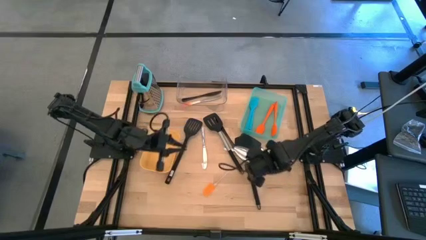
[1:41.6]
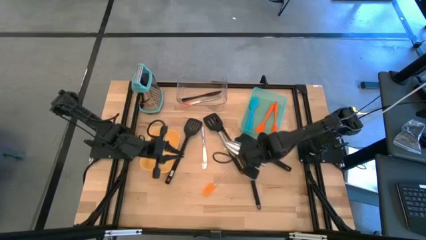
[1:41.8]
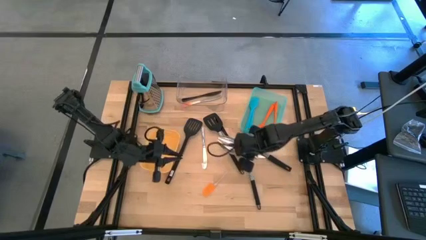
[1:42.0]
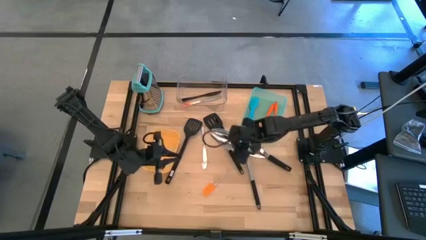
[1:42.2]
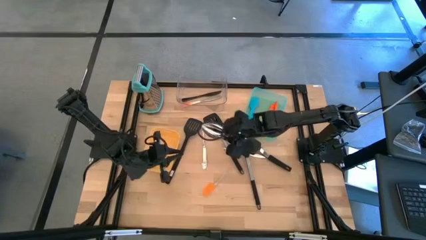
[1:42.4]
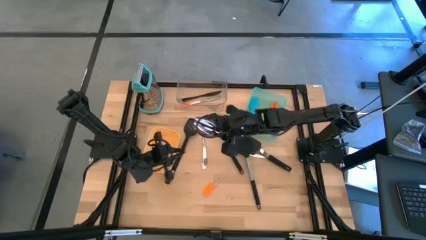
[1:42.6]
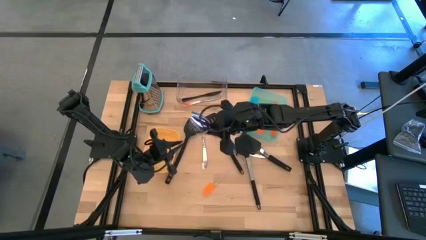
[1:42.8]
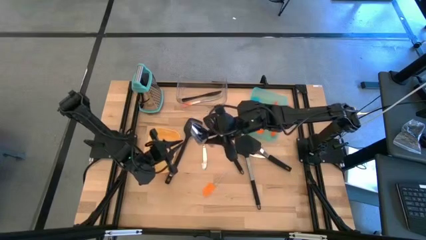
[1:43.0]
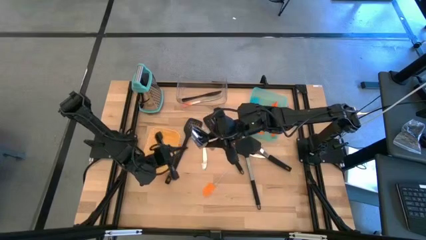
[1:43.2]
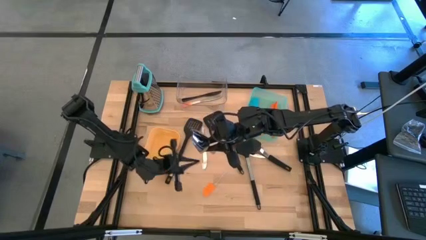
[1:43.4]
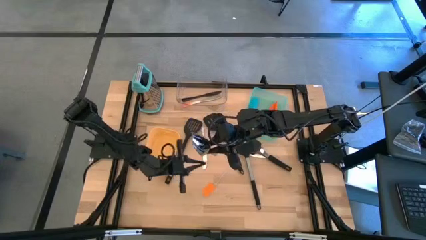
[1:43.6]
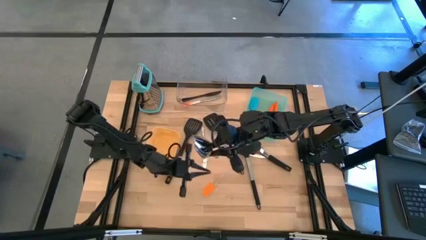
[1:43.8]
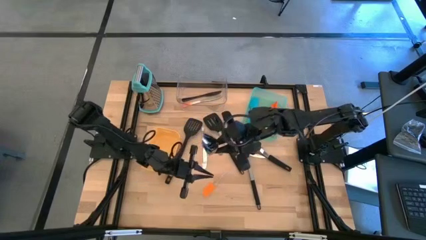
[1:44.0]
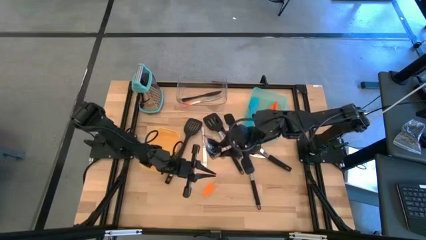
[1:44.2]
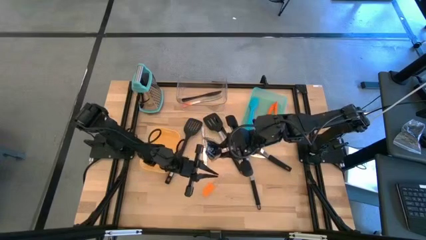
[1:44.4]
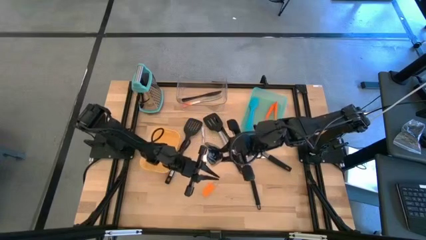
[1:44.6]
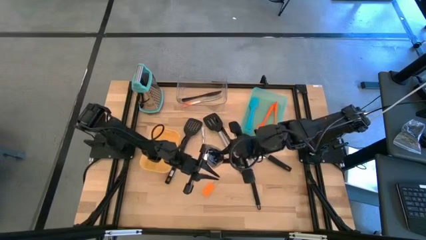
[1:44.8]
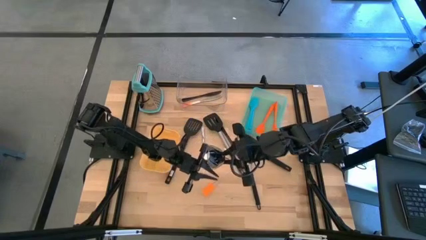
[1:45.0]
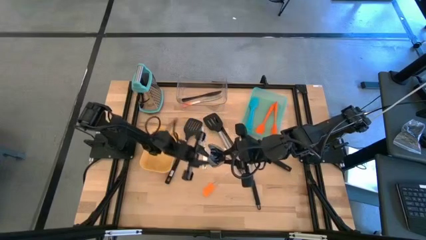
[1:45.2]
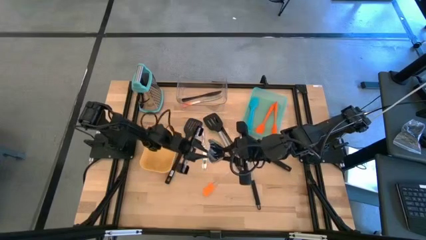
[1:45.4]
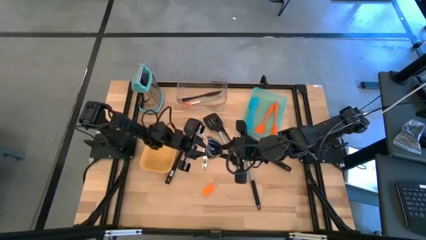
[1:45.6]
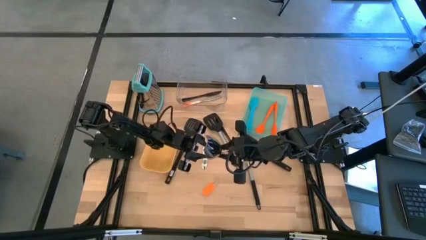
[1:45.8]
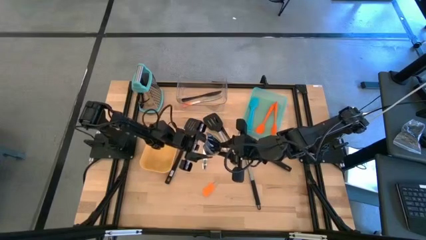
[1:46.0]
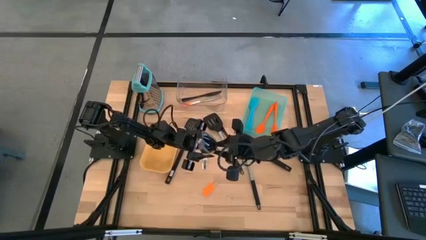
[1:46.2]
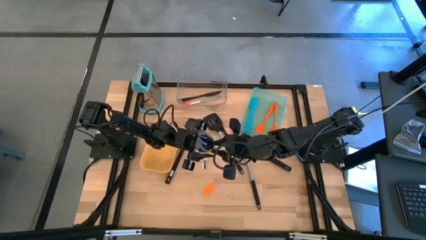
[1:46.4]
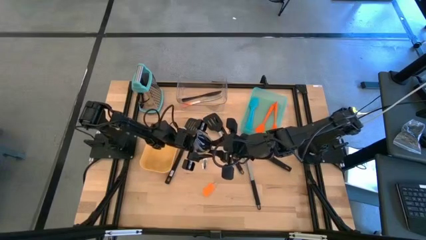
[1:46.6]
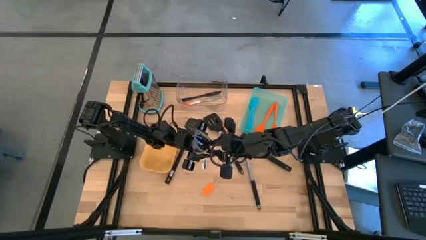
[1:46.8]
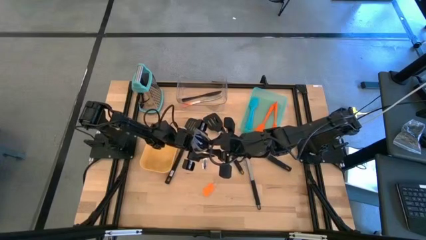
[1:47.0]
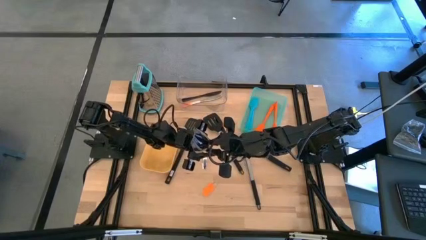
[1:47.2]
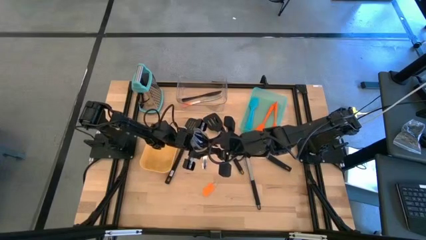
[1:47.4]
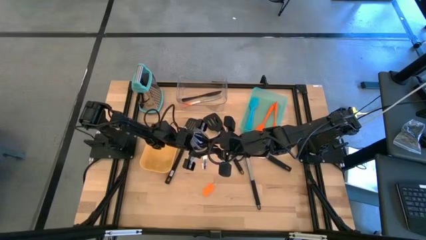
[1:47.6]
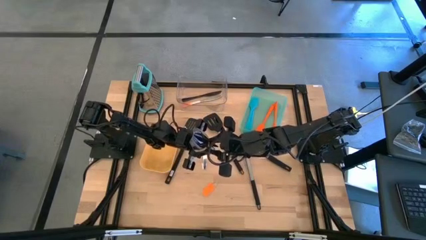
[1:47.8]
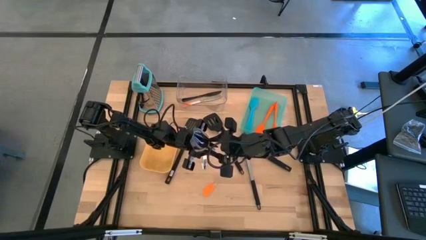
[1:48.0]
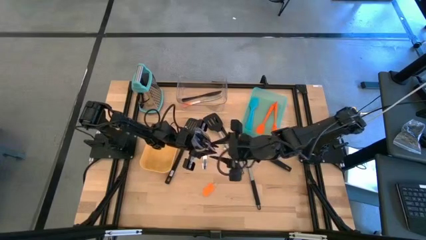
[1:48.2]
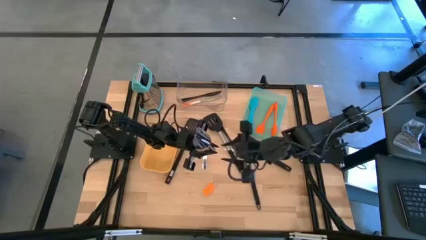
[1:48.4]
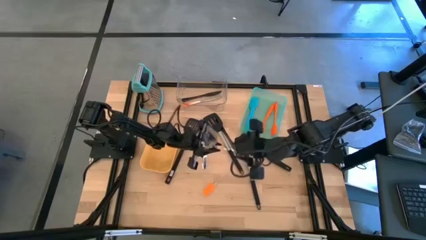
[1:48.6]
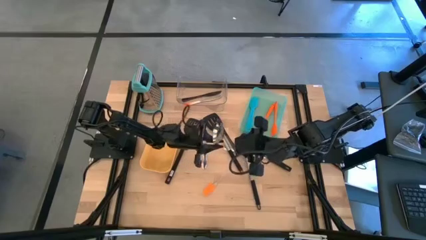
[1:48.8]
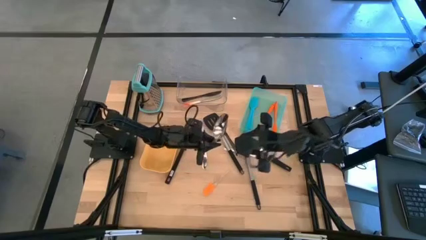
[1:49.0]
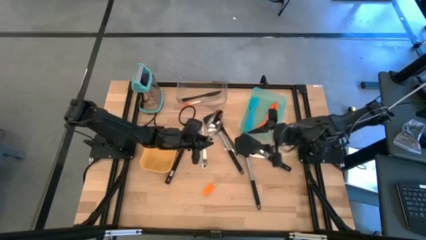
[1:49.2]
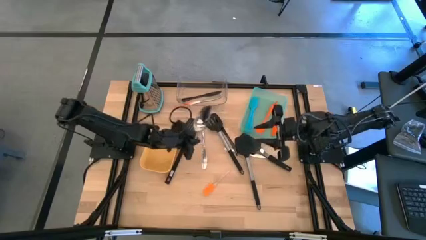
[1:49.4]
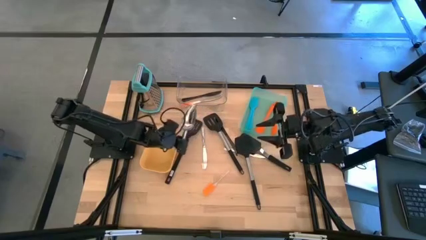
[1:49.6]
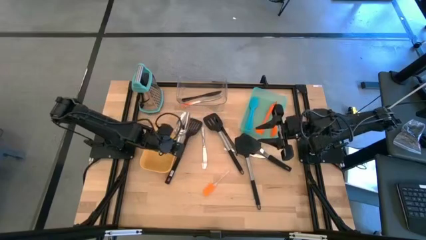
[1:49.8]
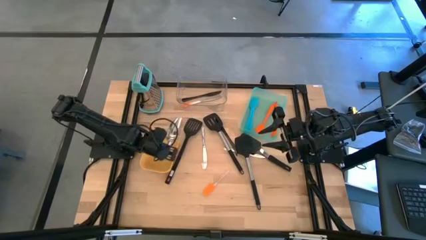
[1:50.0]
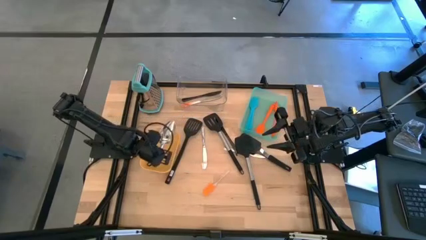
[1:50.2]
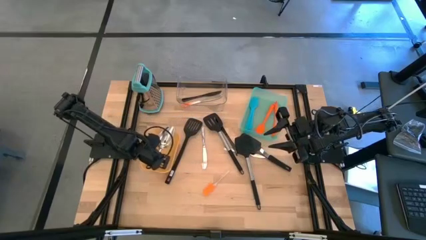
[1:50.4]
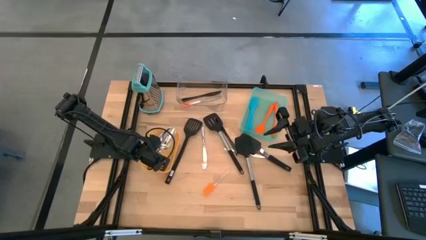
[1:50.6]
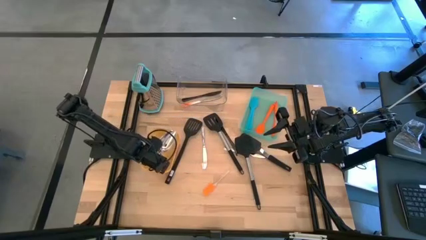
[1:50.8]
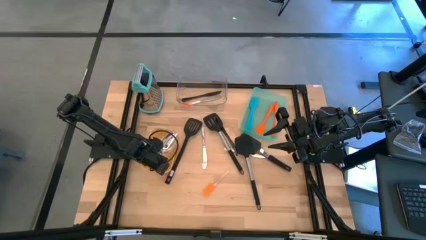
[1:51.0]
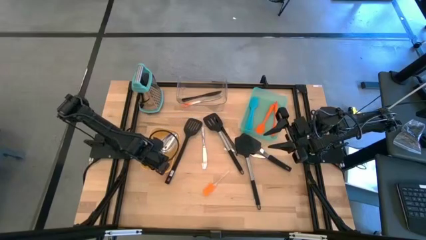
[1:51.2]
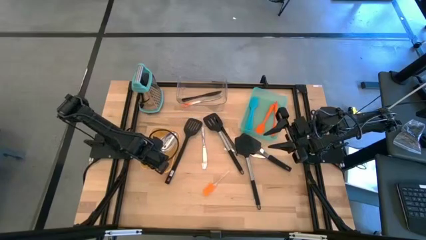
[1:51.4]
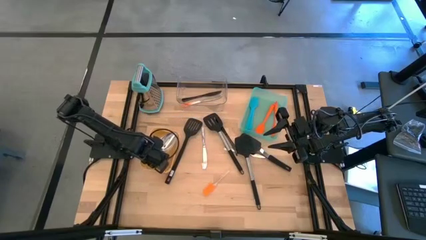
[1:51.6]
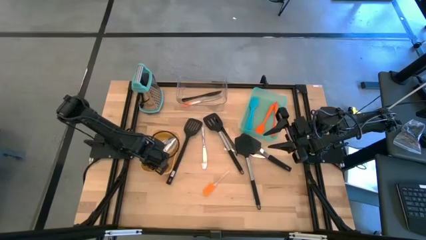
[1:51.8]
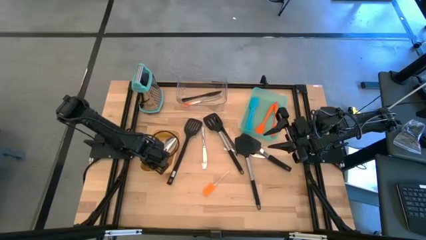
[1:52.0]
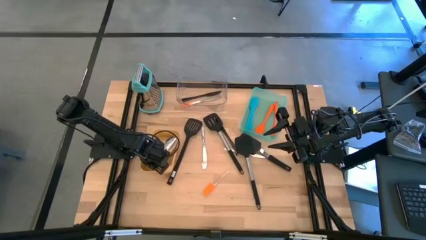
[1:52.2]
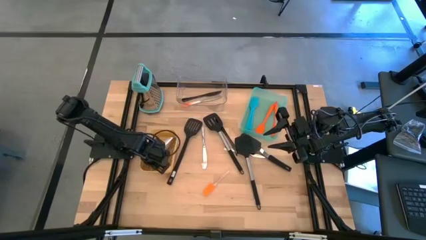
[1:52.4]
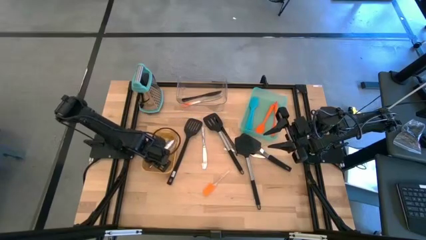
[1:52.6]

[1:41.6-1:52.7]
Task: Pick & Place Kitchen Items
Put the ice scoop into the yellow bin
